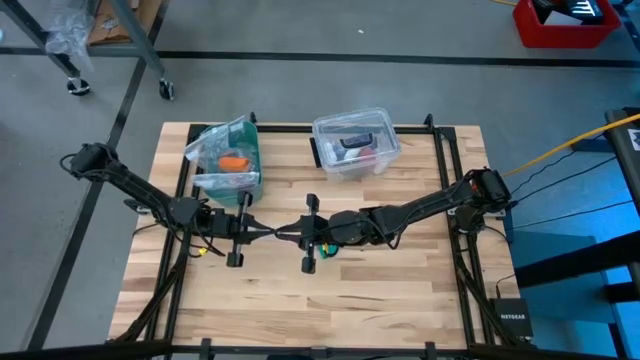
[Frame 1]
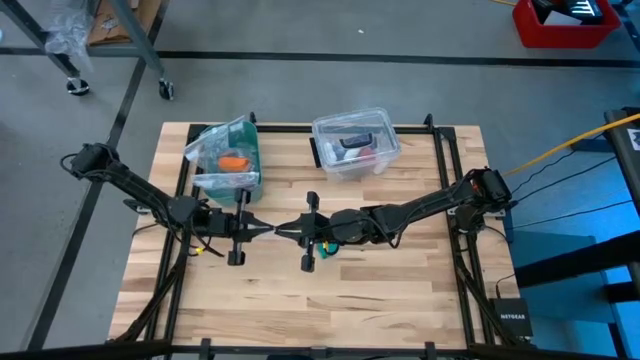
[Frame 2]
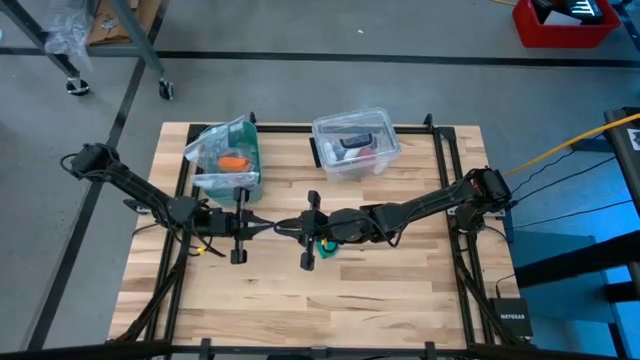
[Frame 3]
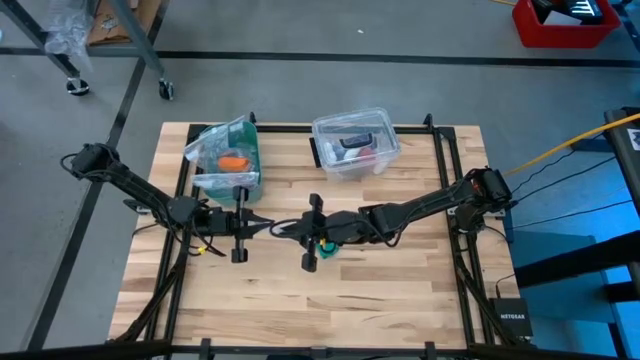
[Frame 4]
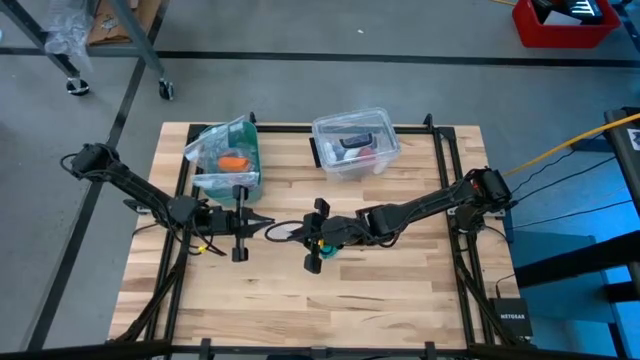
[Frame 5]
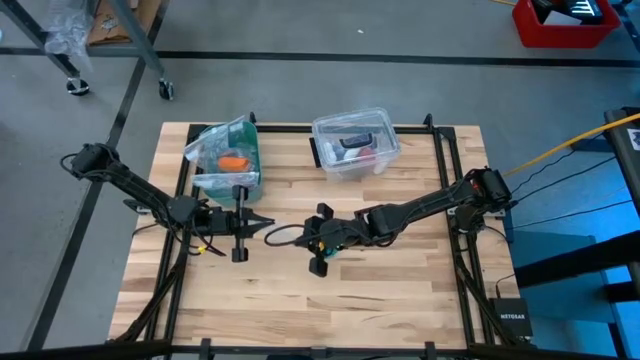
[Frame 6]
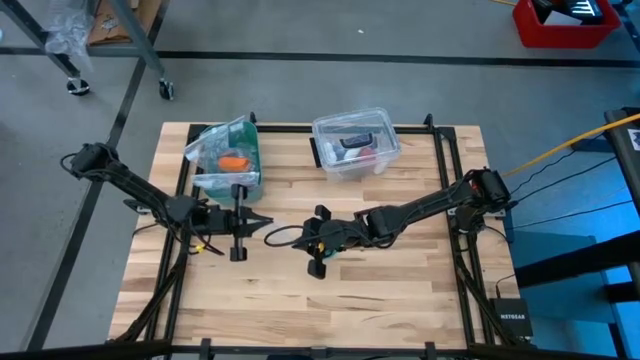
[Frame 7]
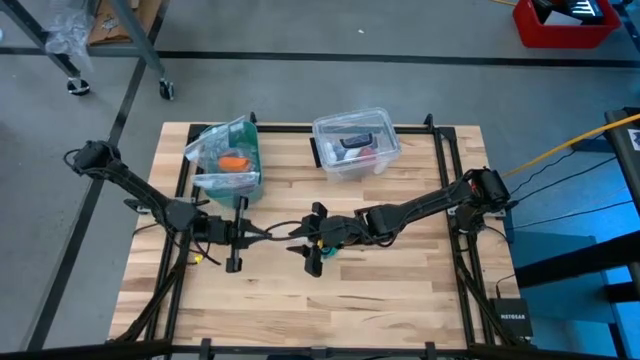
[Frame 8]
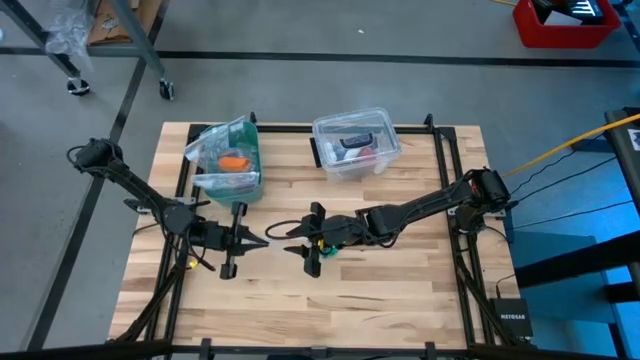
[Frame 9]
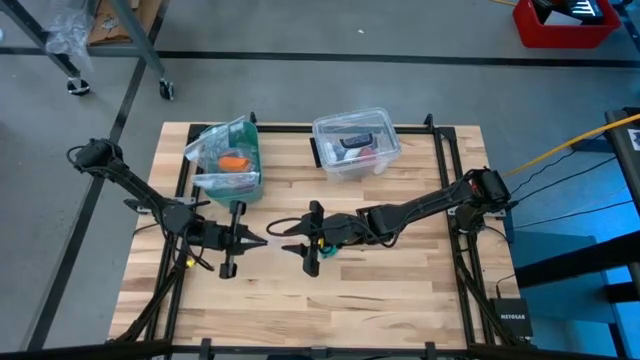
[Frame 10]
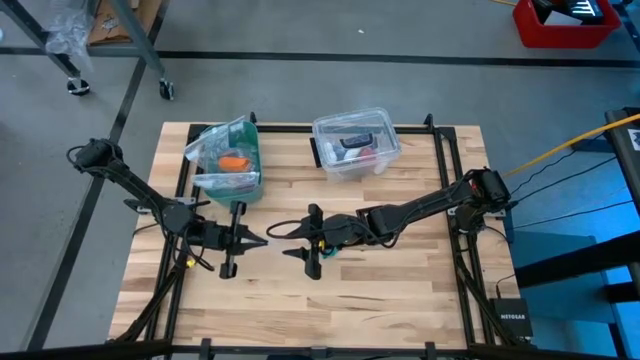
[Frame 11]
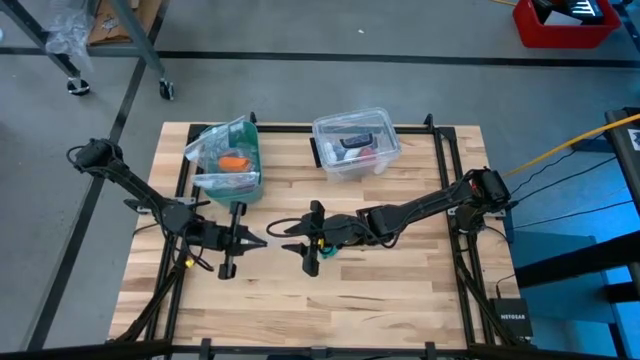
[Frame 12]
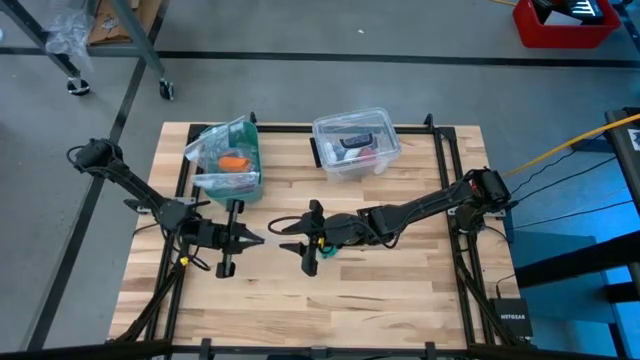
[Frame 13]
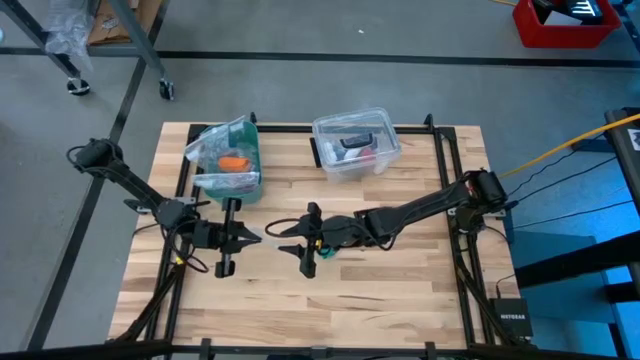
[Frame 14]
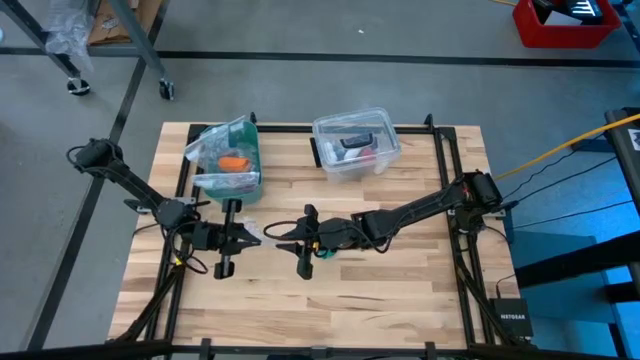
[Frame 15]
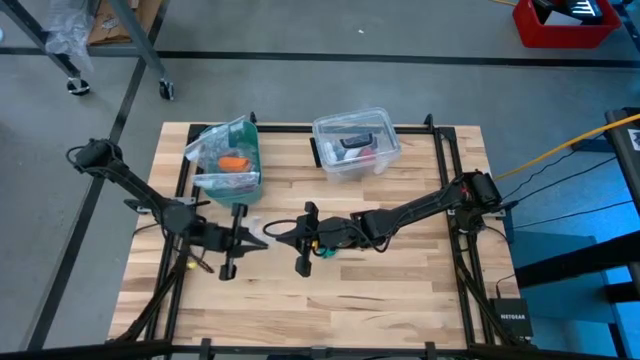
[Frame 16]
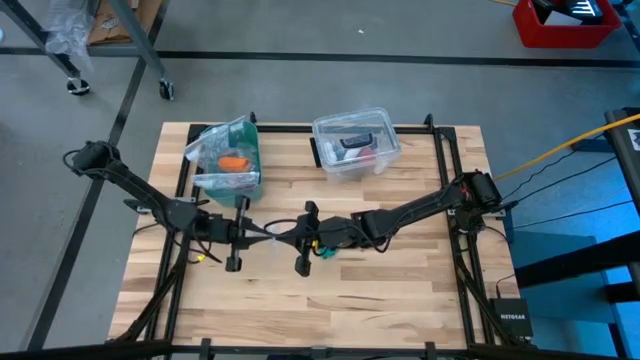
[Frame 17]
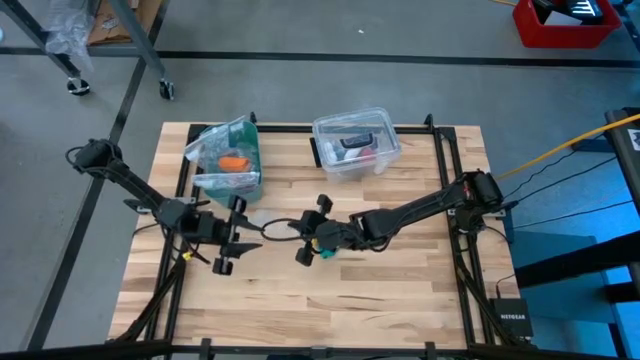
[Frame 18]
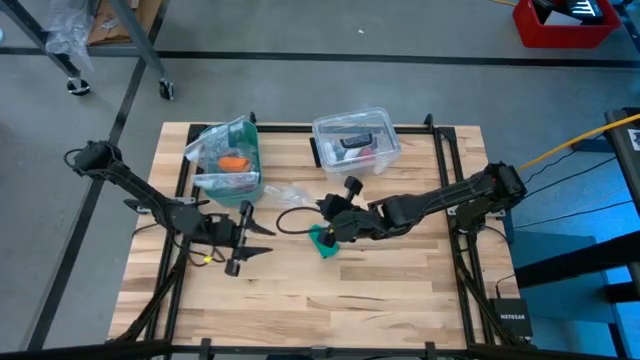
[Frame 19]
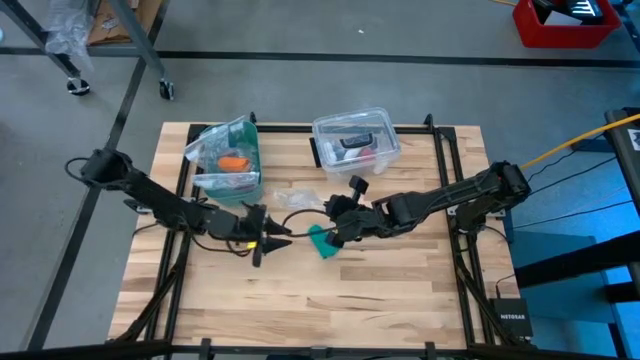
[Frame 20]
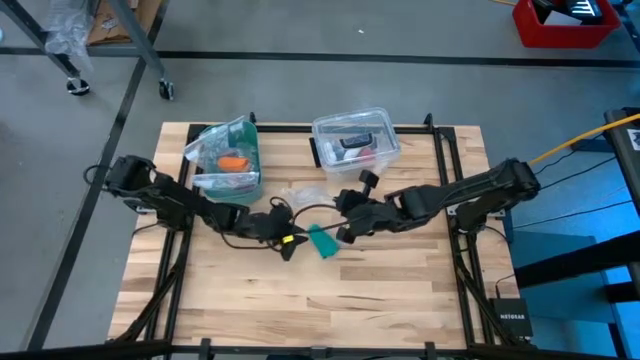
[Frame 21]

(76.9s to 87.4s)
Task: Roll bandage
Open the transparent zip bag

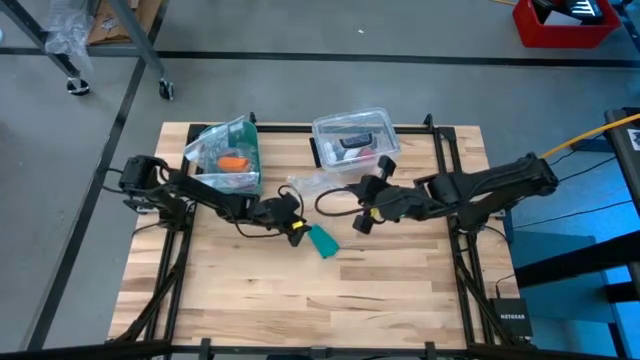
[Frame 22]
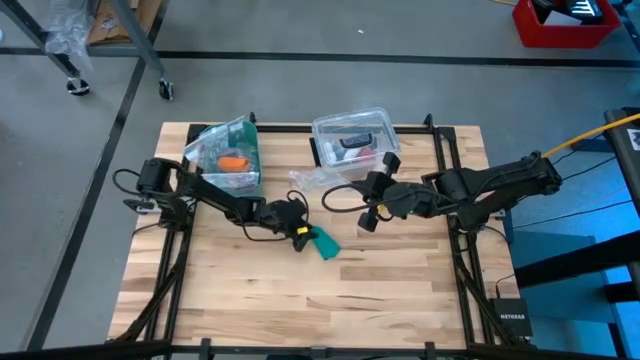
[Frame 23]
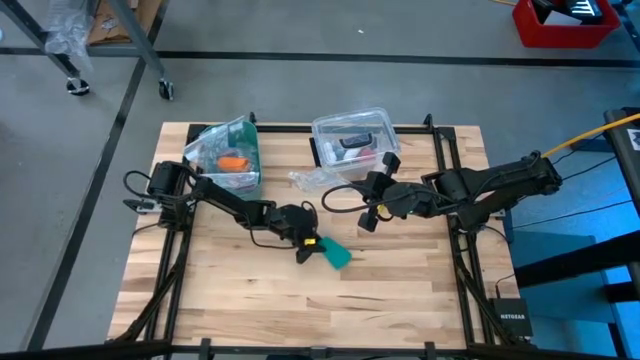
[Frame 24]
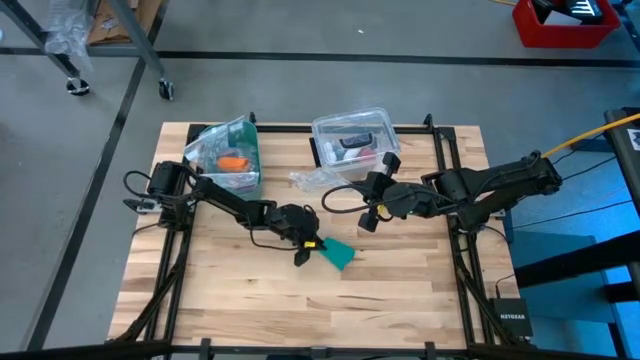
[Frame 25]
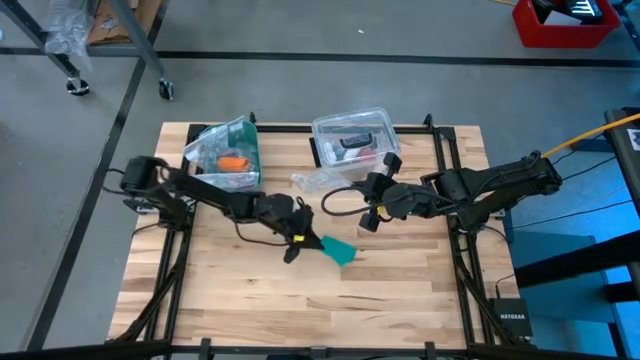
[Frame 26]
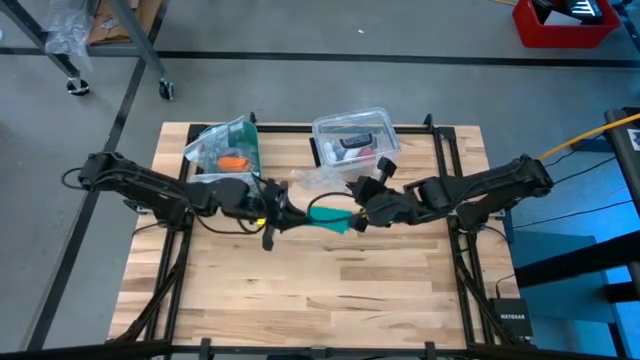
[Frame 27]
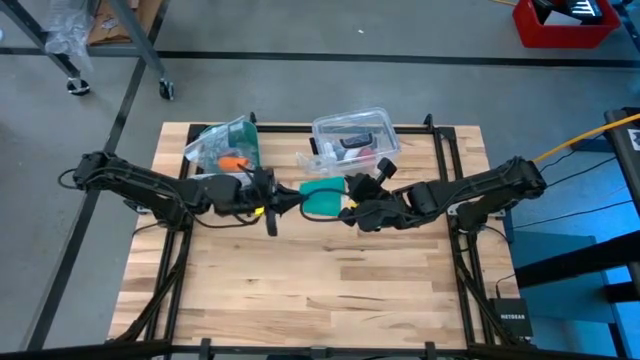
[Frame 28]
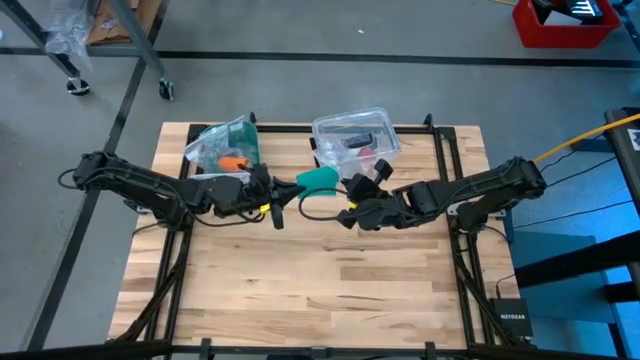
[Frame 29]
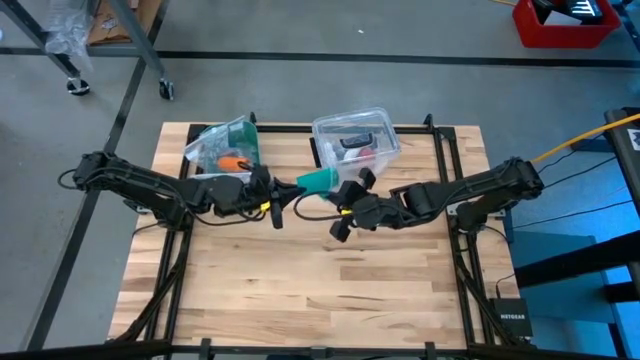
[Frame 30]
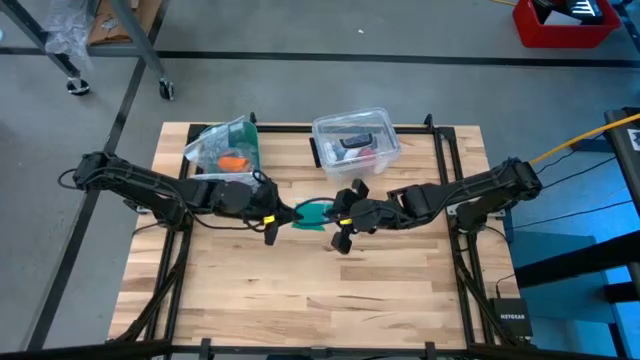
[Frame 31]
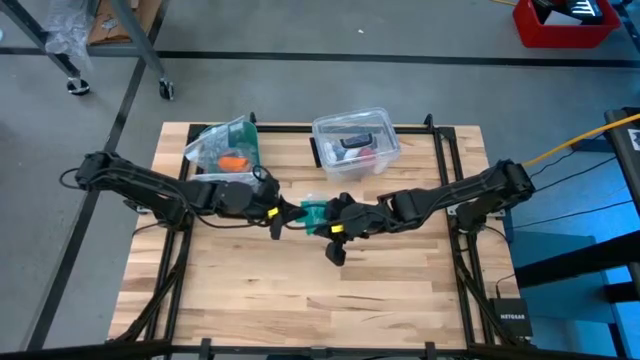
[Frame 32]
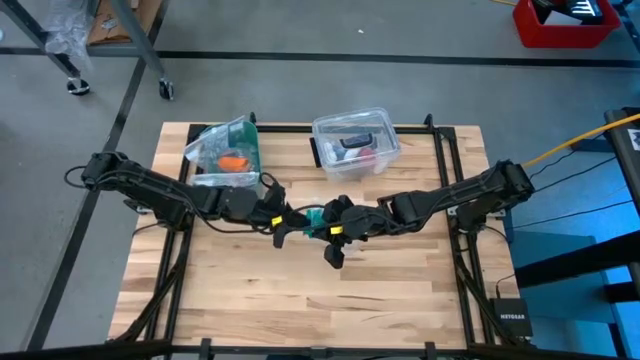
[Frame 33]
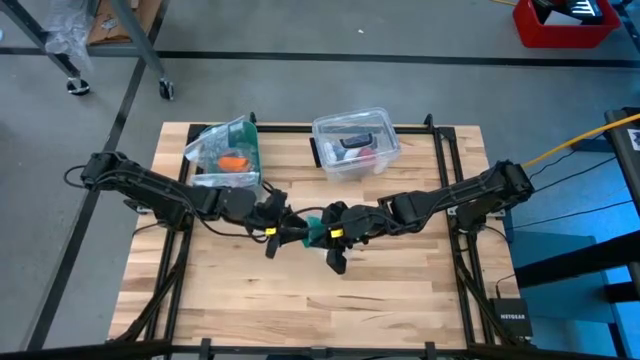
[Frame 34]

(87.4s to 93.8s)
Put the green bandage into the transparent zip bag

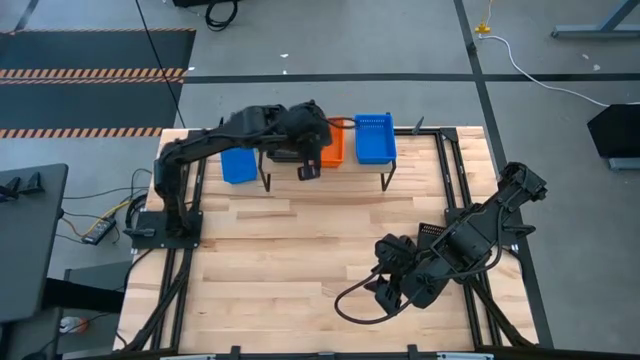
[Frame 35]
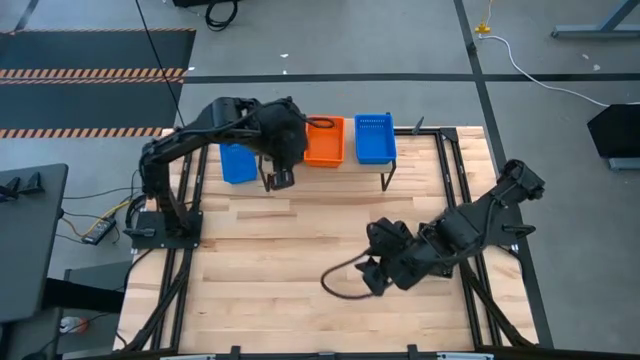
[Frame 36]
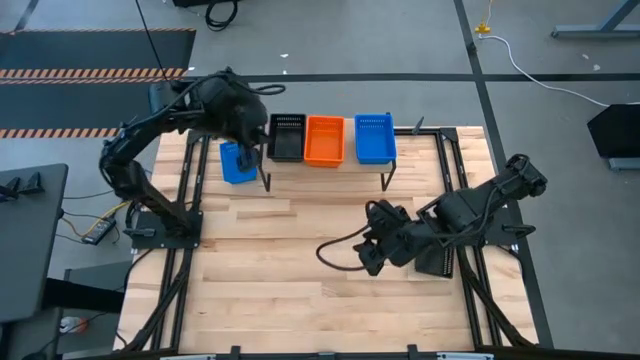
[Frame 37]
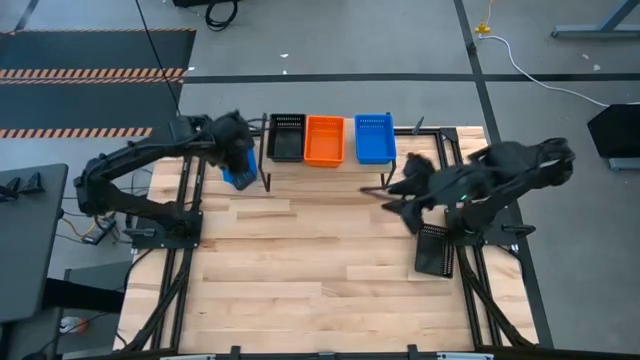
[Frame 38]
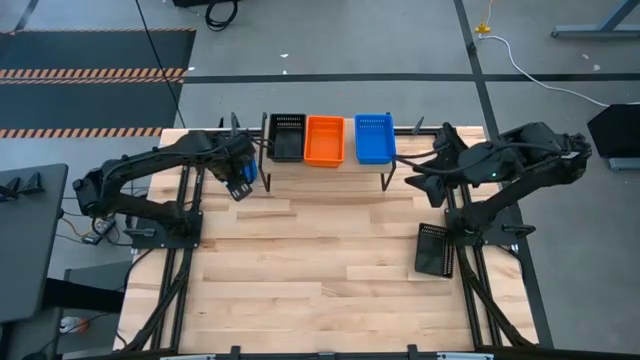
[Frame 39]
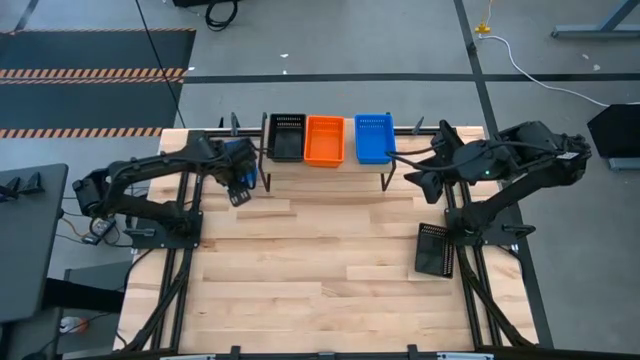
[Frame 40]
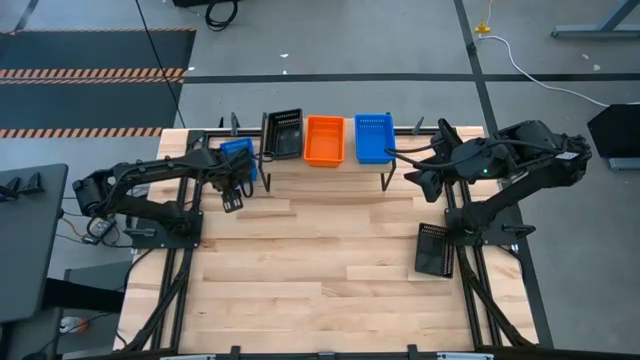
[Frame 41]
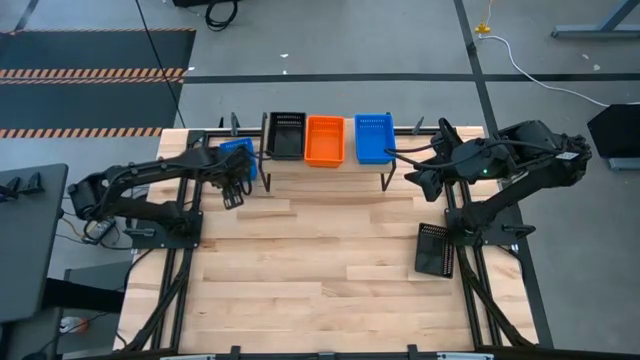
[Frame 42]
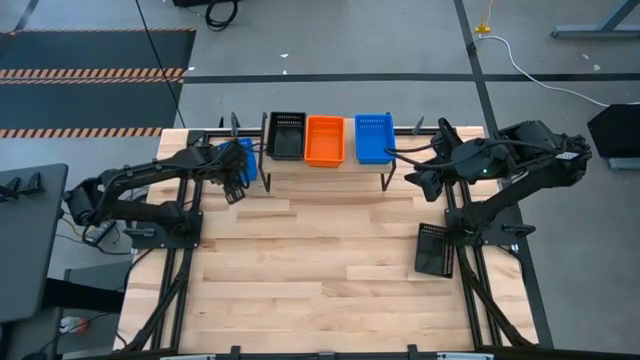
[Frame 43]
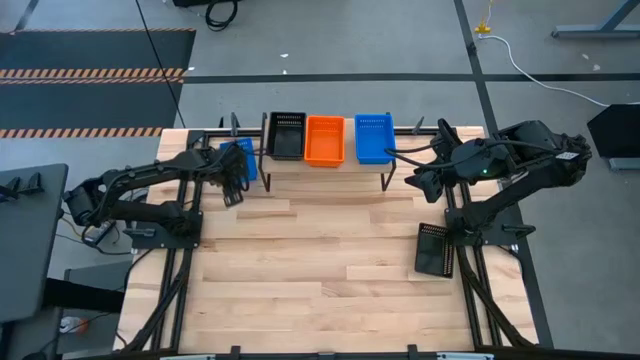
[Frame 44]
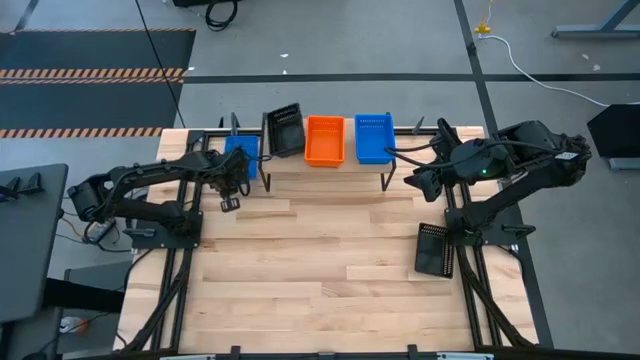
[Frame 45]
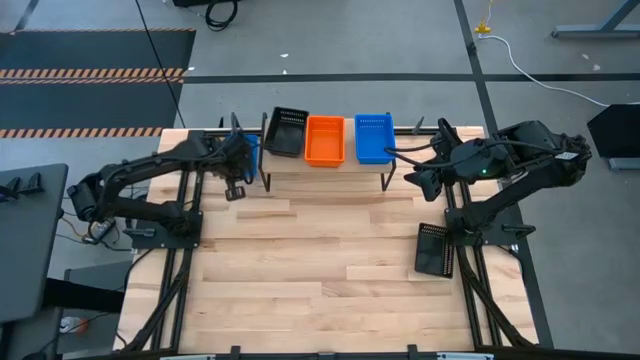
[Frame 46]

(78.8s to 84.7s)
Task: Stack baskets on shelf by color
Stack the blue bin on top of the blue bin on the shelf
